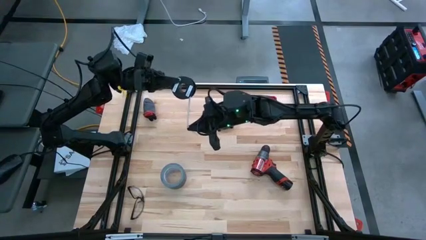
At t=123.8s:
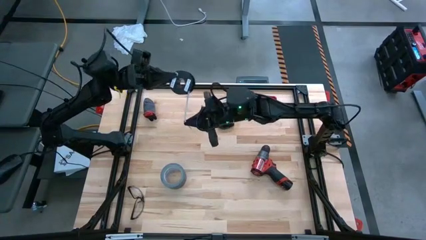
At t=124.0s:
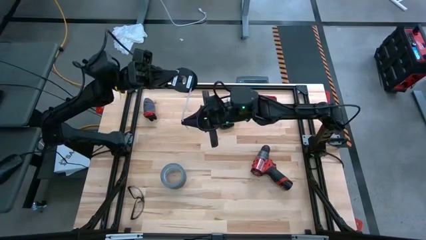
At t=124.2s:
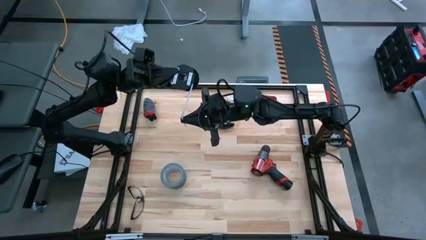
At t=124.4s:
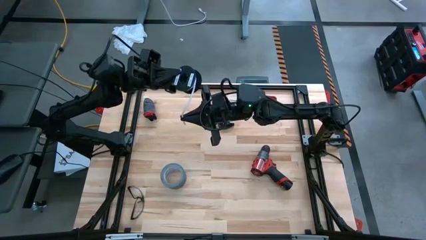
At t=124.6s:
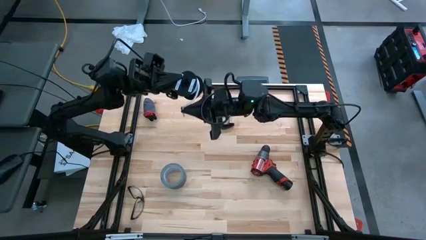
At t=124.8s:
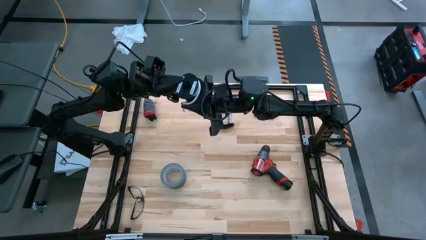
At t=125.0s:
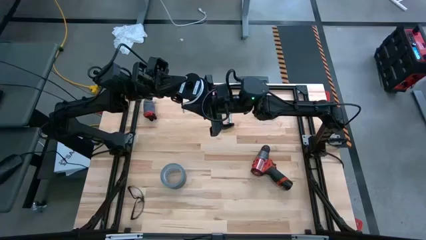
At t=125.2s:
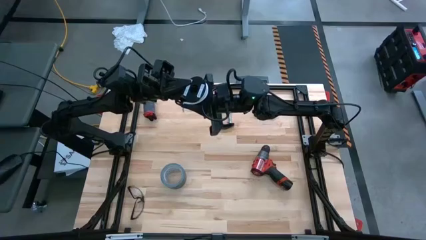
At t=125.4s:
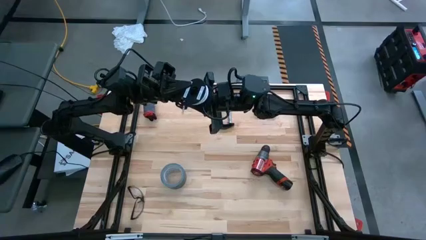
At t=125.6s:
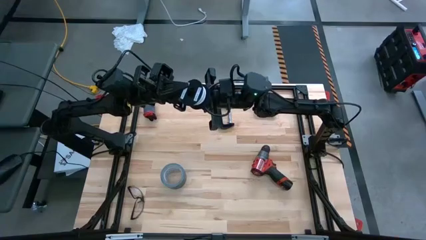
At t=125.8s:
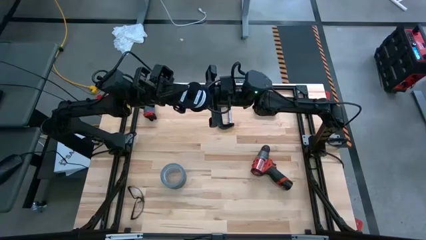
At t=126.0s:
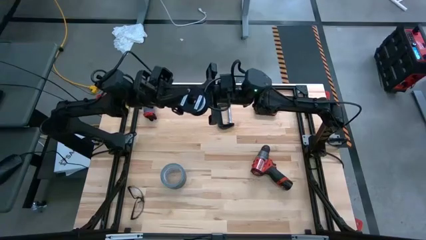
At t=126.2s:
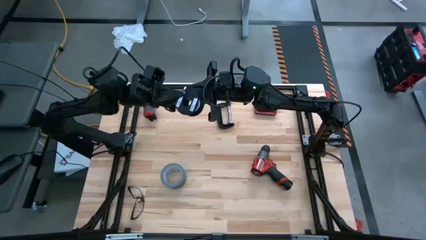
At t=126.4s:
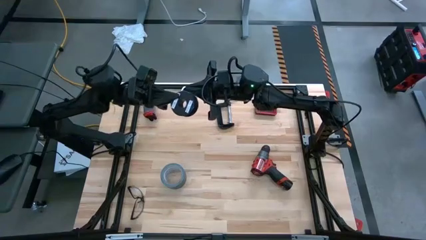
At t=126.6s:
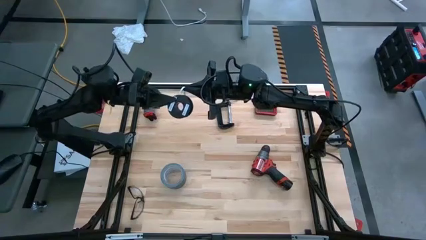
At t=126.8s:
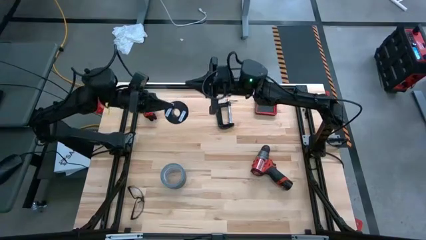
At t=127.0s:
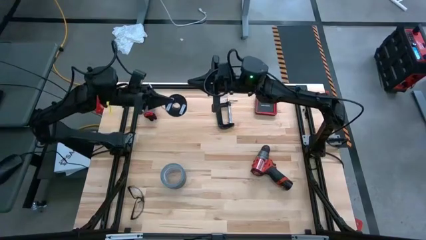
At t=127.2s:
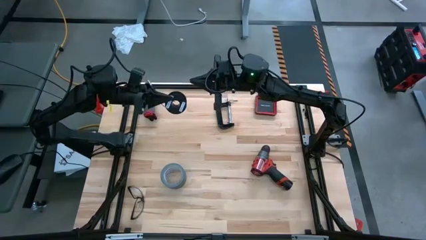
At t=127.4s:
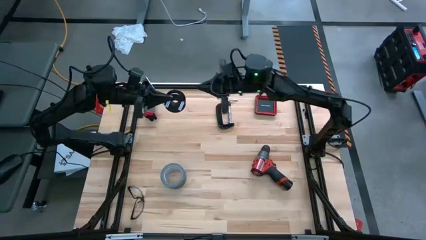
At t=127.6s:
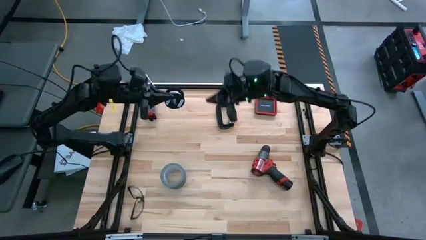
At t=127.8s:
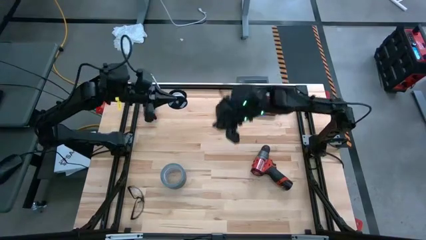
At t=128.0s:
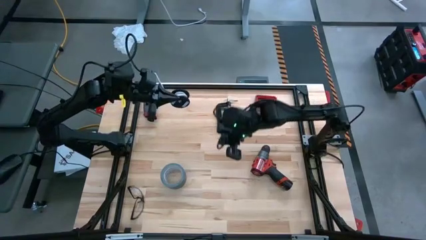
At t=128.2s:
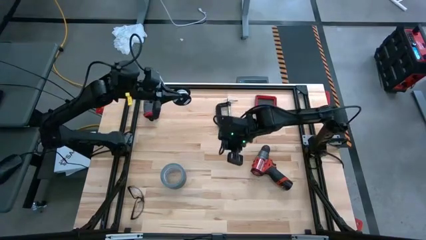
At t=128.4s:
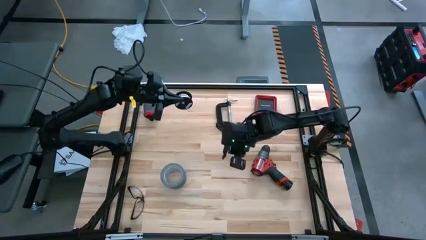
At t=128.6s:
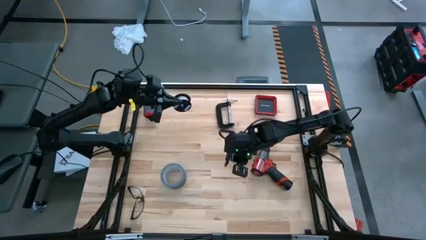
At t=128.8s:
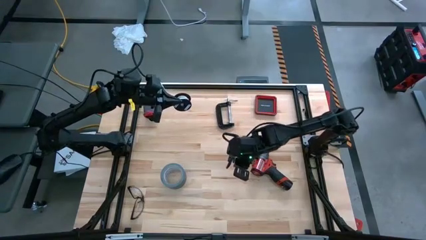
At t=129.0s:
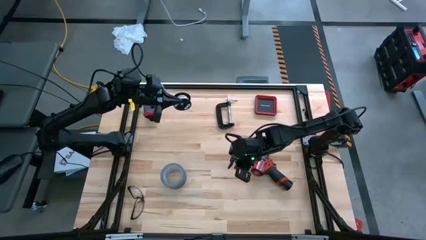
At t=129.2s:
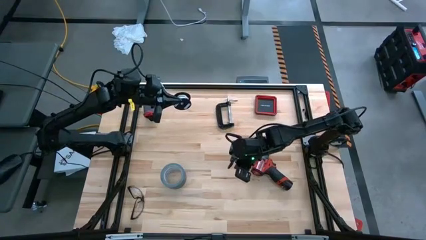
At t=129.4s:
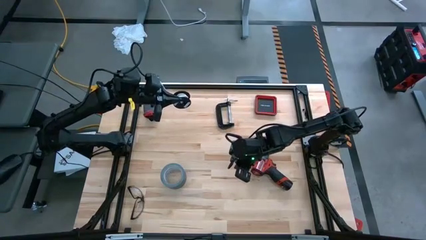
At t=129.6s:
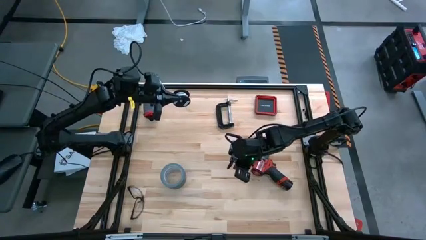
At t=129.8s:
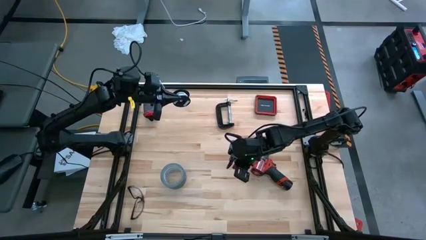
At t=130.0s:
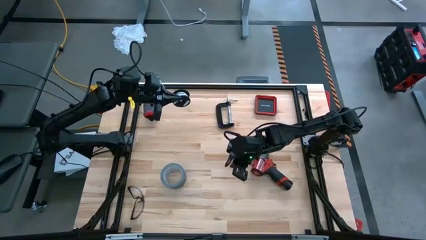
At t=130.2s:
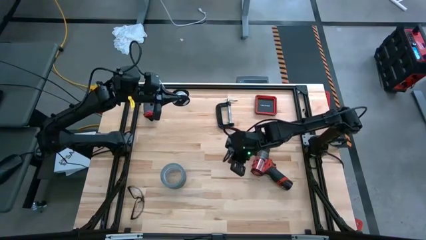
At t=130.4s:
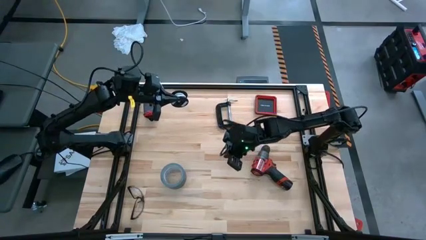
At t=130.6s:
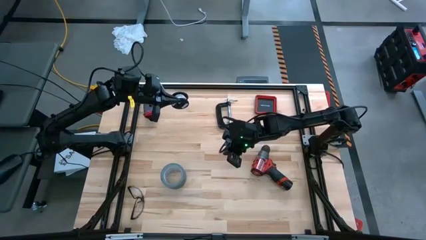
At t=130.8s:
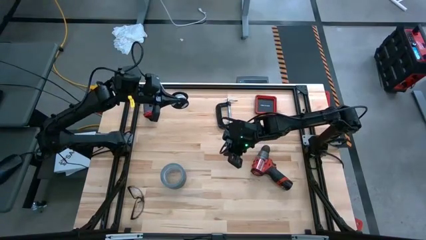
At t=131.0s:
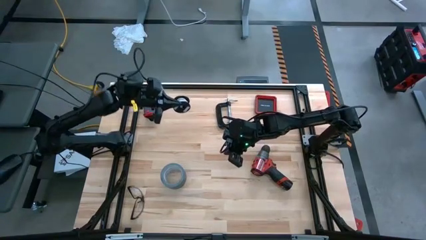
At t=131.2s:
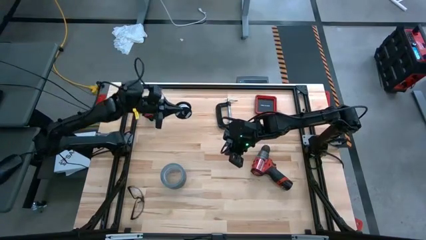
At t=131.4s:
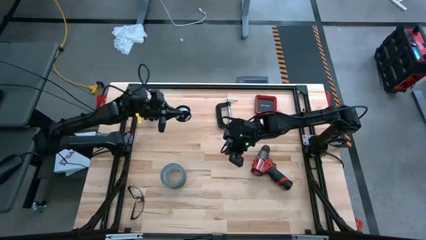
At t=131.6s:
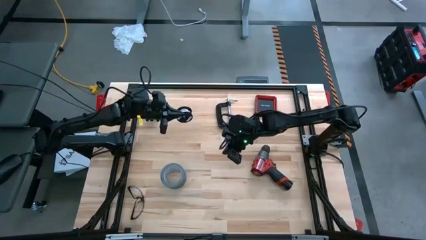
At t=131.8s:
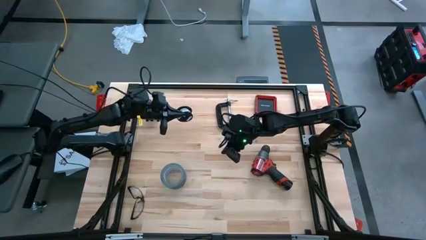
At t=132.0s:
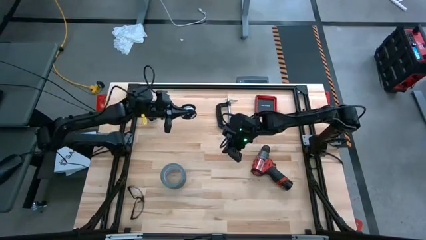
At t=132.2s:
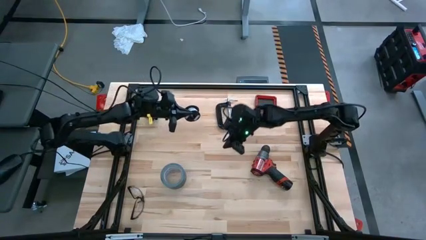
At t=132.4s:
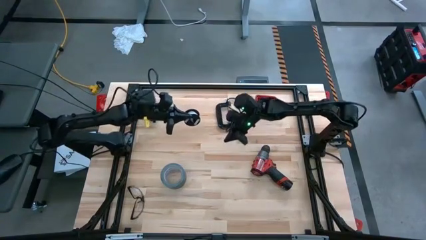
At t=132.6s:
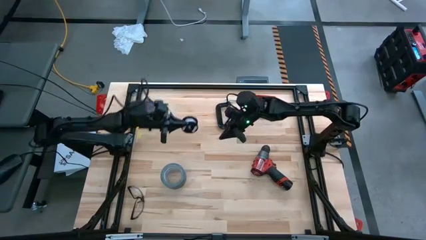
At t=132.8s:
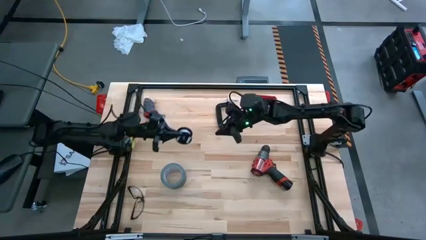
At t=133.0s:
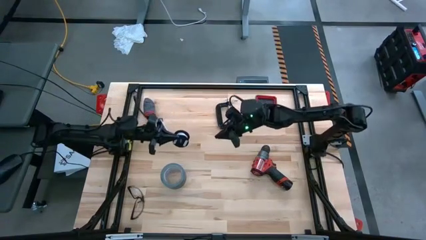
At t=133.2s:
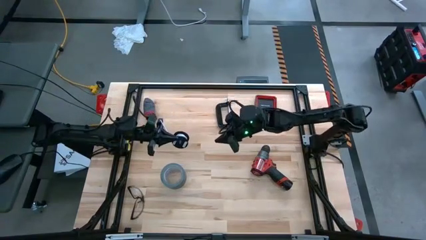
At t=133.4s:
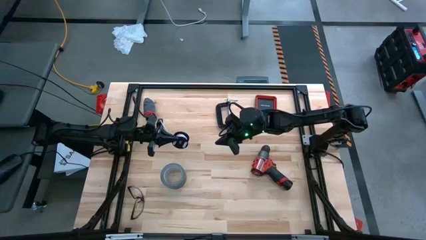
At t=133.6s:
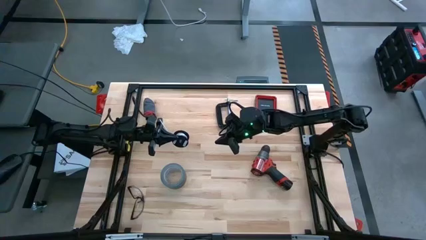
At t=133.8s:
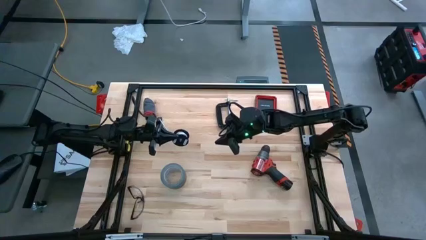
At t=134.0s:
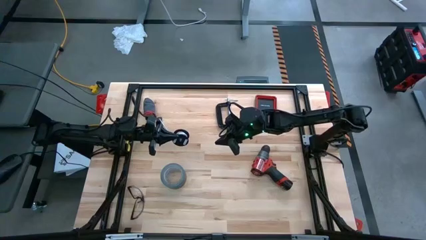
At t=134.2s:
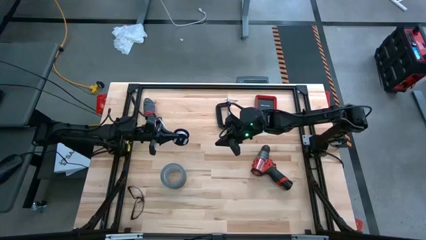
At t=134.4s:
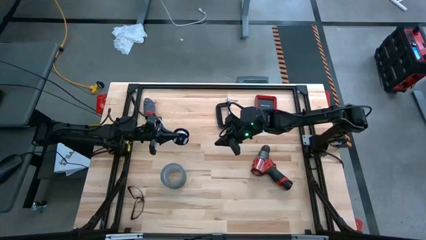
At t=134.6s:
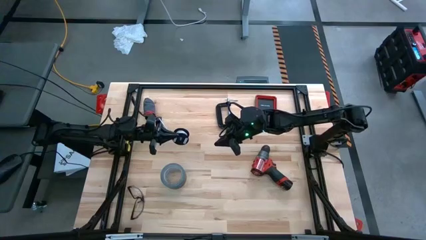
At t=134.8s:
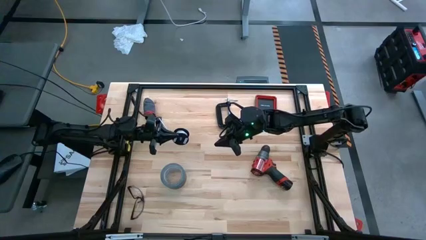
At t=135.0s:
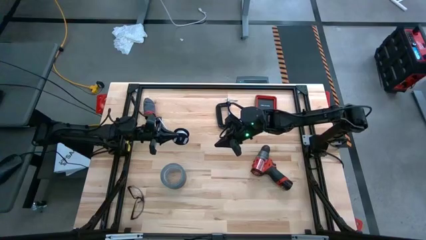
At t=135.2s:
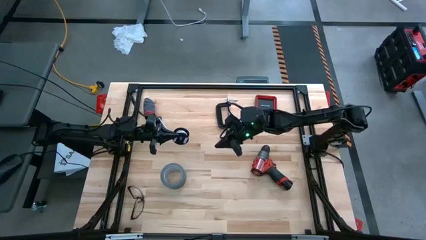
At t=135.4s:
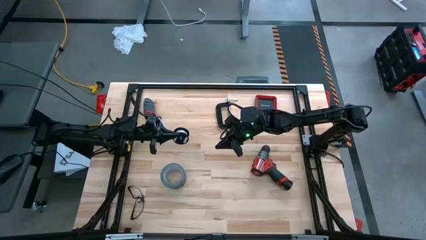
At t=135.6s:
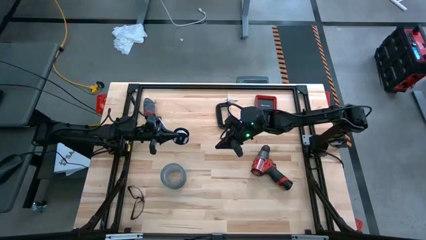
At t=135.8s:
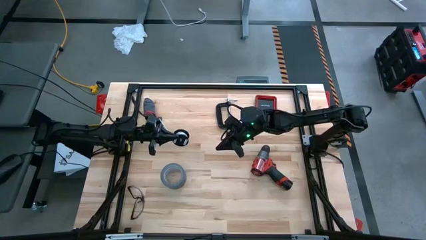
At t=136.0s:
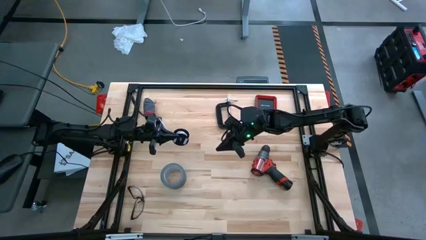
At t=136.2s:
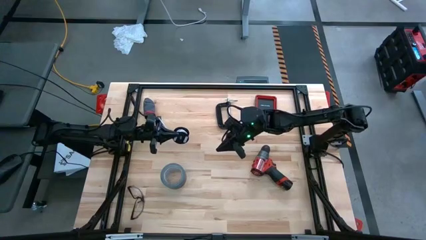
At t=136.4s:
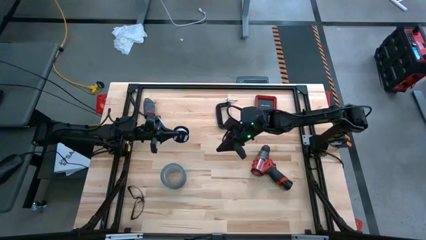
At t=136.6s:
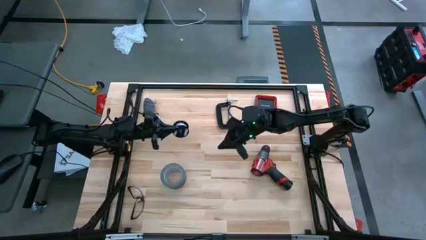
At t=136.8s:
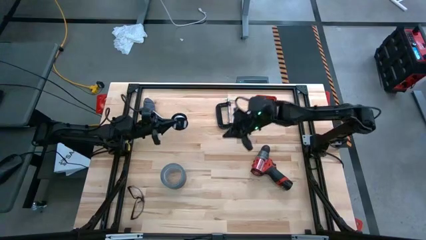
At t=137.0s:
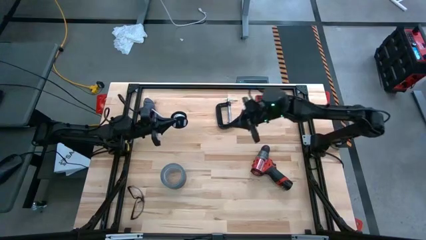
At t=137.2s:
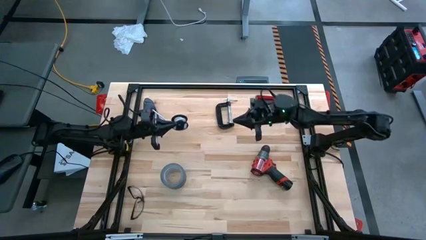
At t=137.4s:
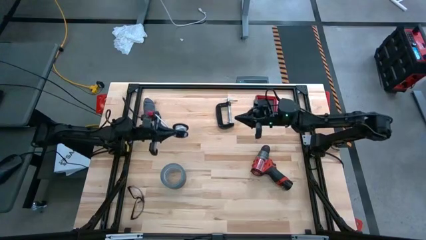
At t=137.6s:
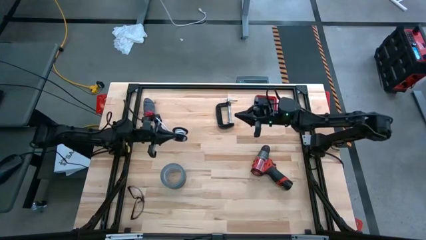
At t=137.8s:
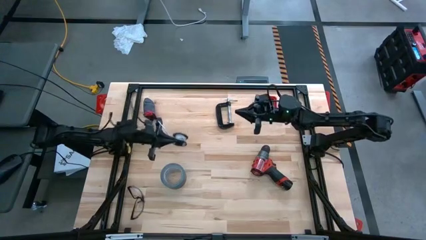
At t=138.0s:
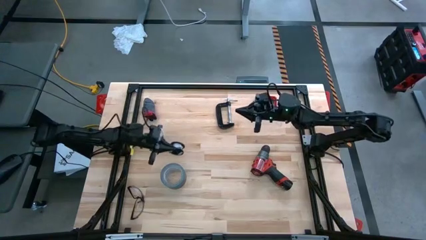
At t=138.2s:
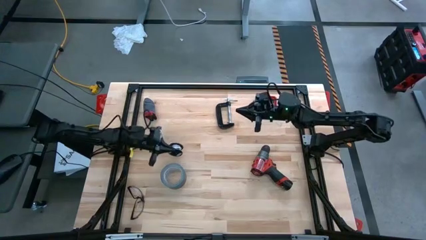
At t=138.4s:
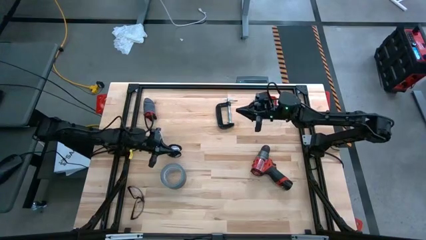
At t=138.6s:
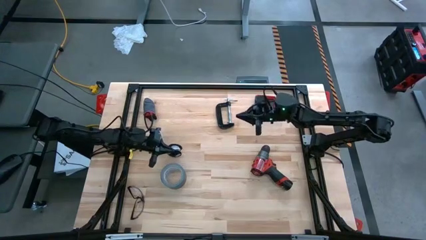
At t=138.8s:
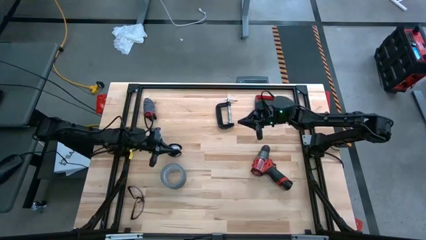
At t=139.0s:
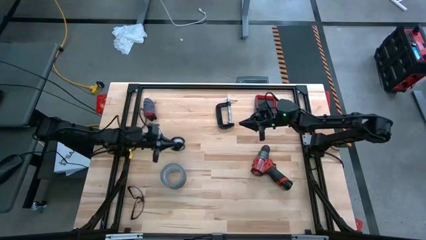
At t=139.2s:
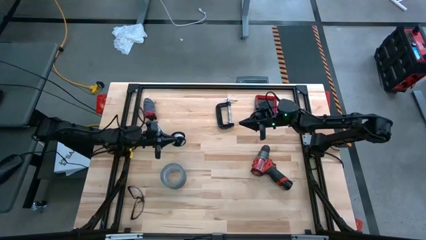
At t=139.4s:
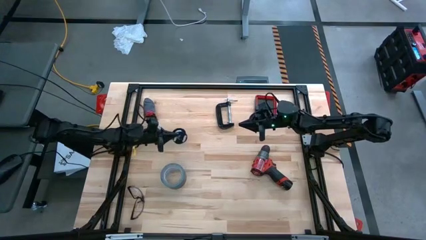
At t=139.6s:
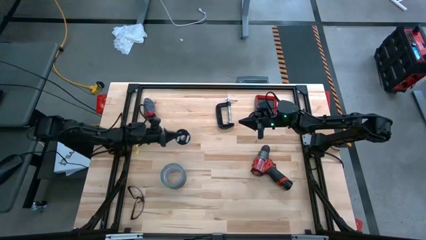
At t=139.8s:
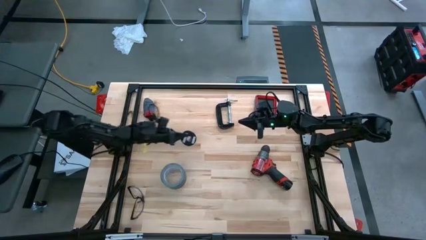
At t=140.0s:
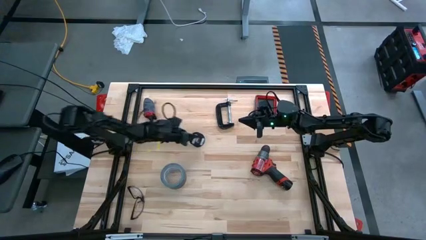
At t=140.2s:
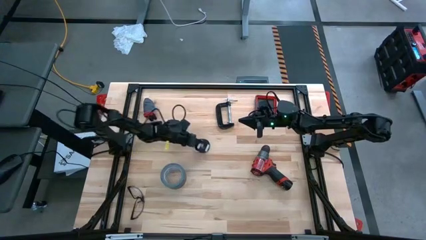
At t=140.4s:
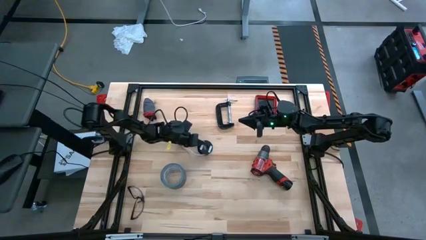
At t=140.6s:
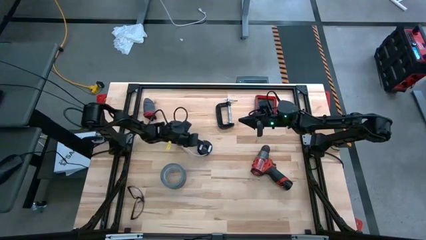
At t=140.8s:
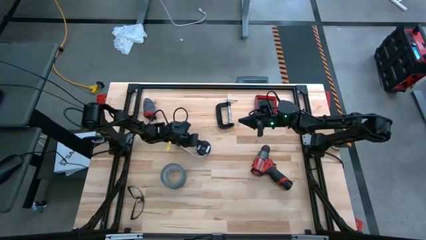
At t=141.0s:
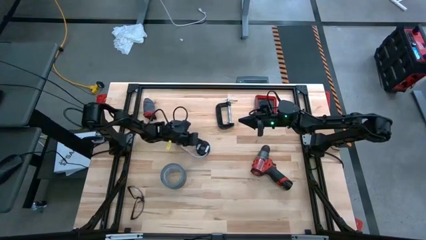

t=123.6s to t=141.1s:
Task: Coil cords
Coil the white wire onto the black spool
